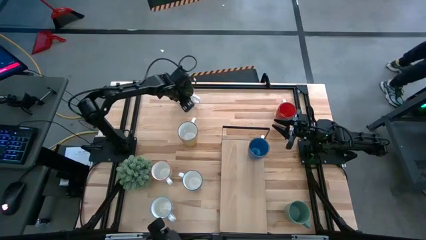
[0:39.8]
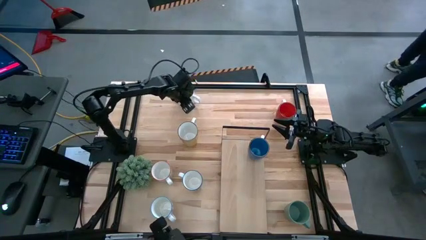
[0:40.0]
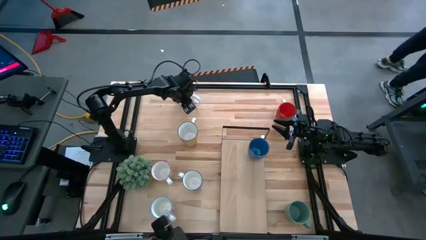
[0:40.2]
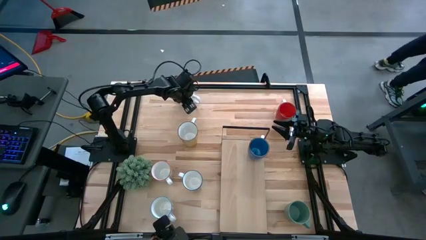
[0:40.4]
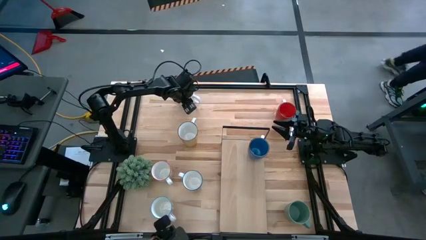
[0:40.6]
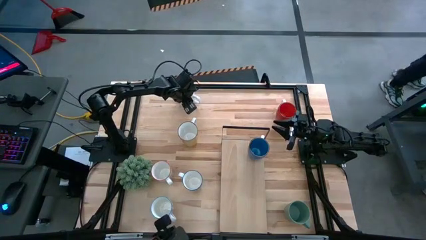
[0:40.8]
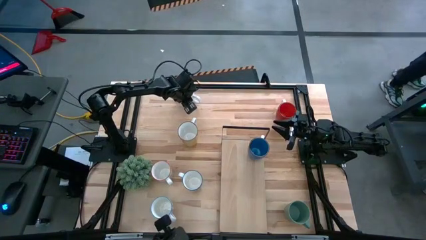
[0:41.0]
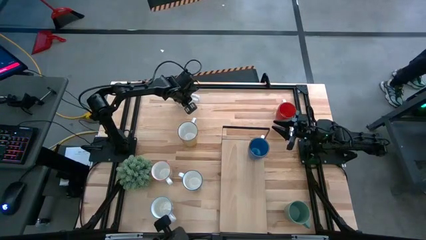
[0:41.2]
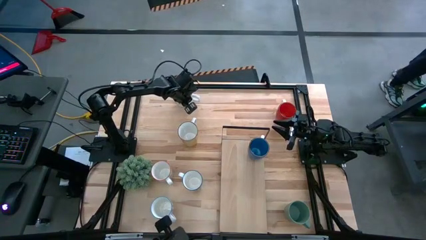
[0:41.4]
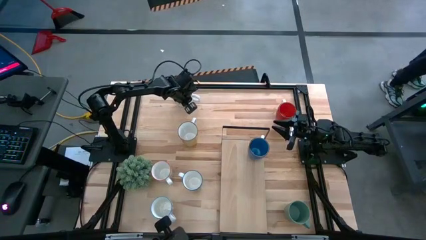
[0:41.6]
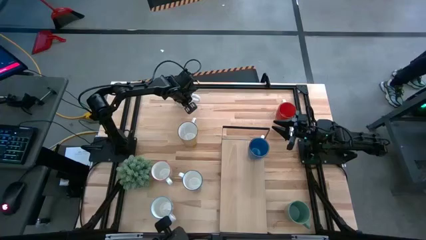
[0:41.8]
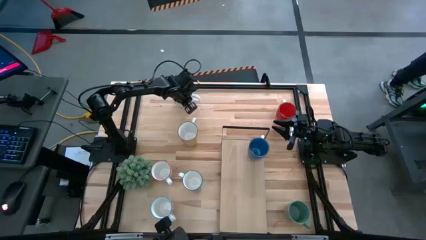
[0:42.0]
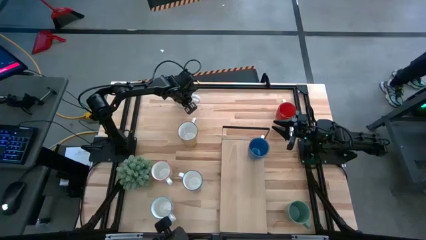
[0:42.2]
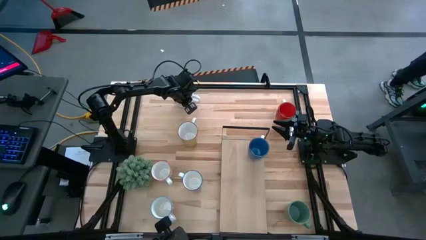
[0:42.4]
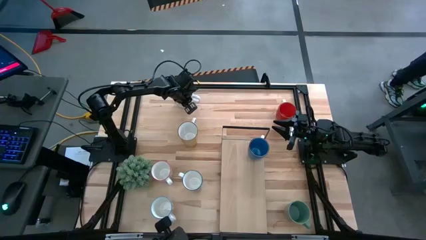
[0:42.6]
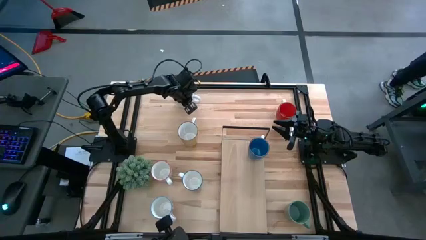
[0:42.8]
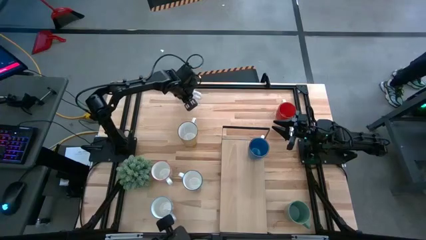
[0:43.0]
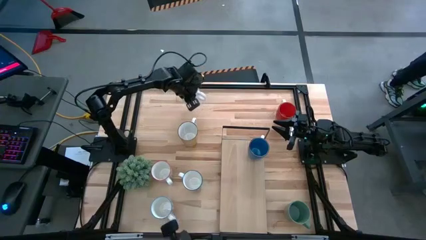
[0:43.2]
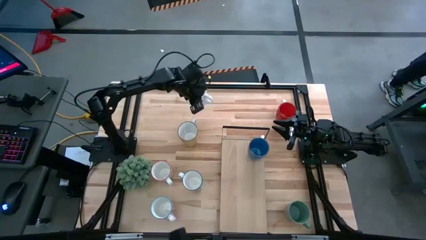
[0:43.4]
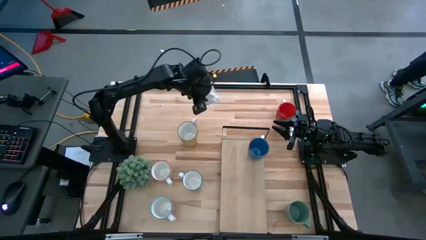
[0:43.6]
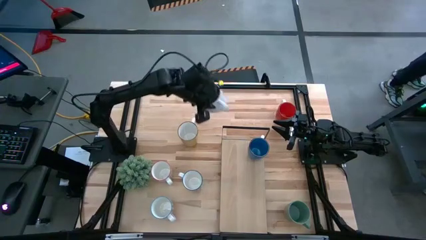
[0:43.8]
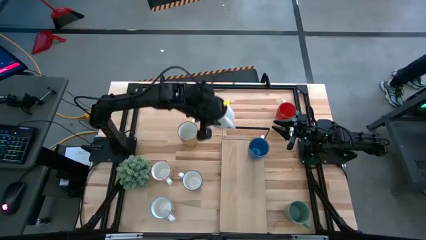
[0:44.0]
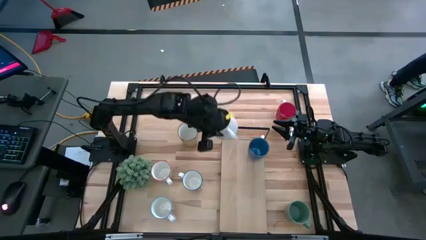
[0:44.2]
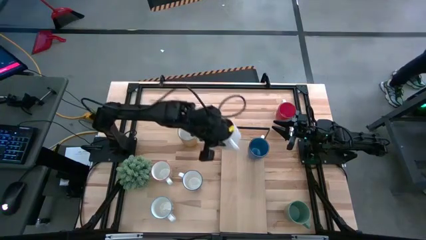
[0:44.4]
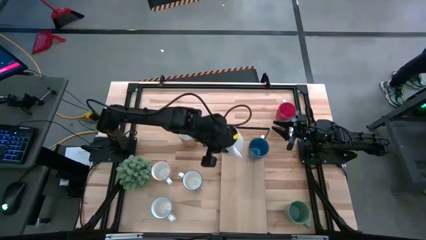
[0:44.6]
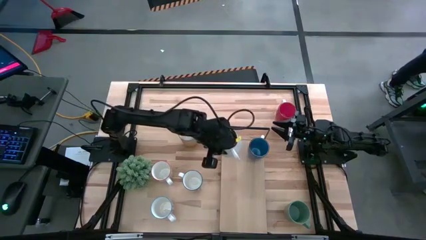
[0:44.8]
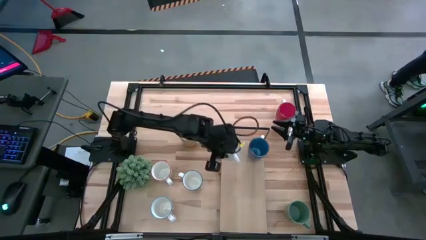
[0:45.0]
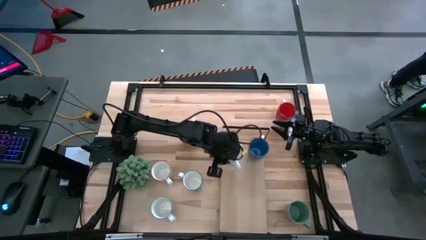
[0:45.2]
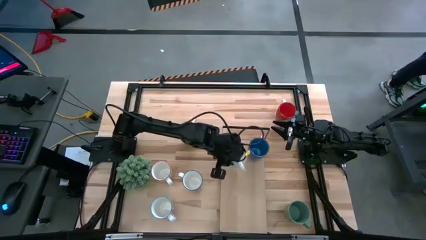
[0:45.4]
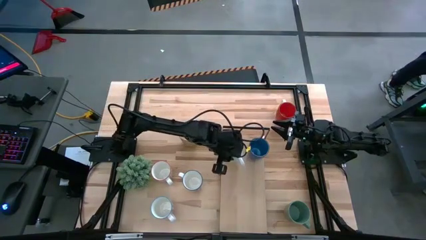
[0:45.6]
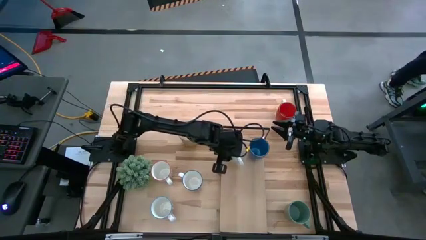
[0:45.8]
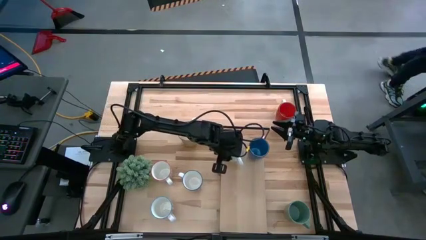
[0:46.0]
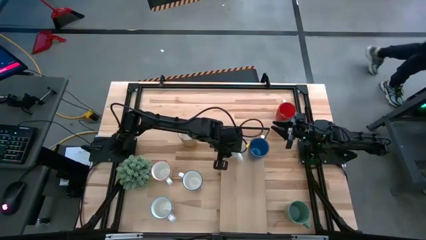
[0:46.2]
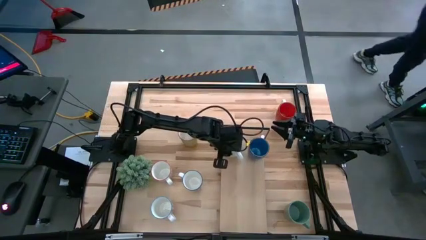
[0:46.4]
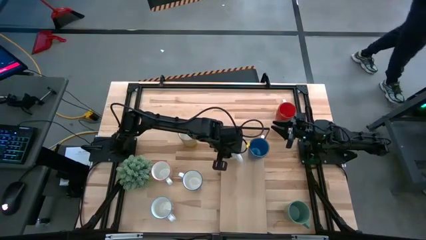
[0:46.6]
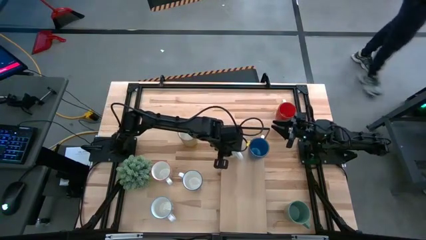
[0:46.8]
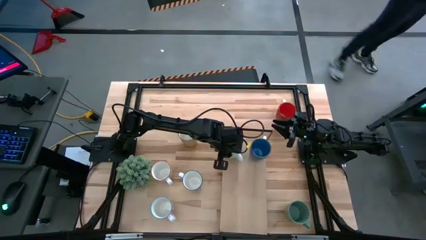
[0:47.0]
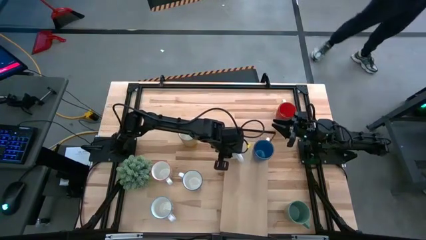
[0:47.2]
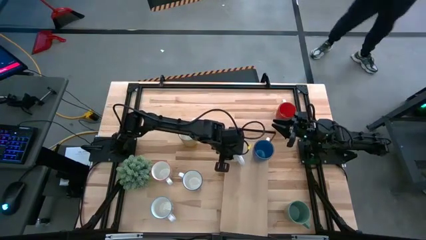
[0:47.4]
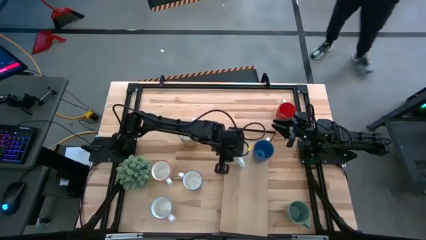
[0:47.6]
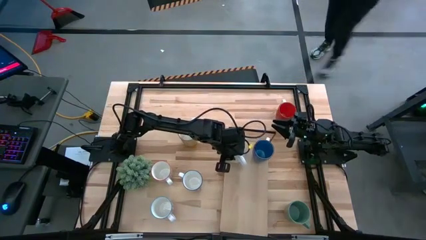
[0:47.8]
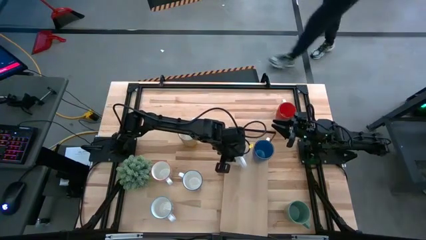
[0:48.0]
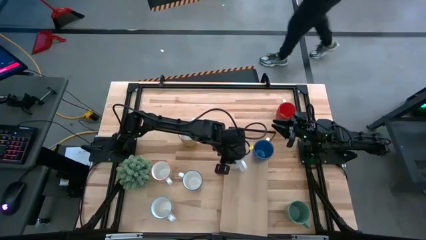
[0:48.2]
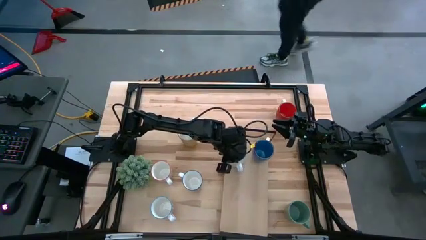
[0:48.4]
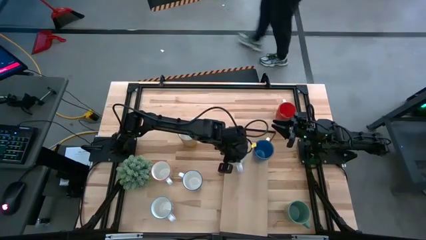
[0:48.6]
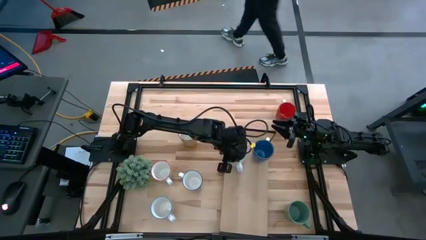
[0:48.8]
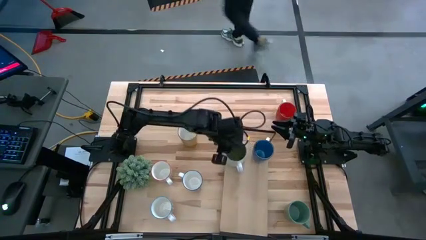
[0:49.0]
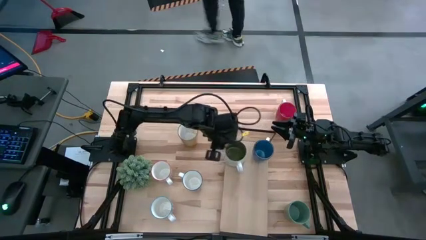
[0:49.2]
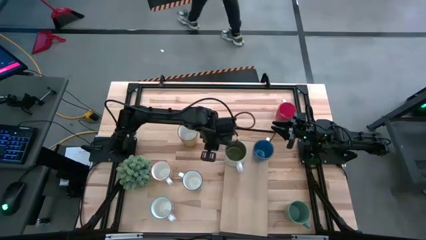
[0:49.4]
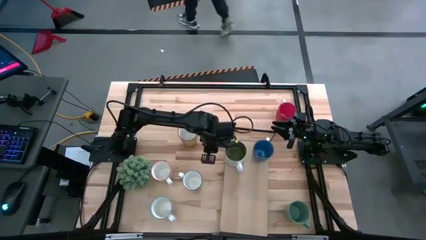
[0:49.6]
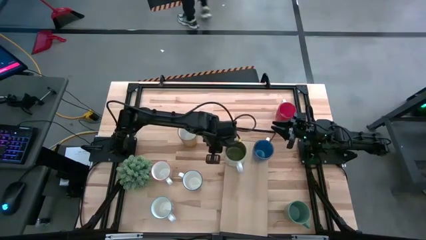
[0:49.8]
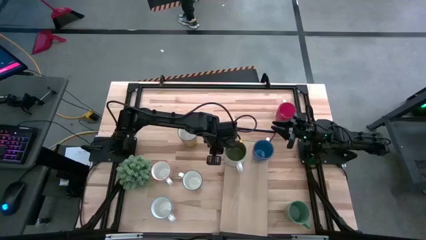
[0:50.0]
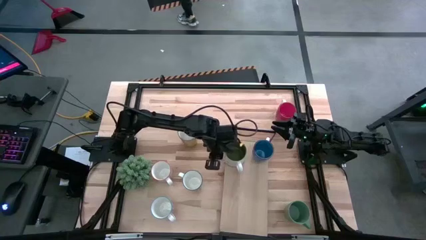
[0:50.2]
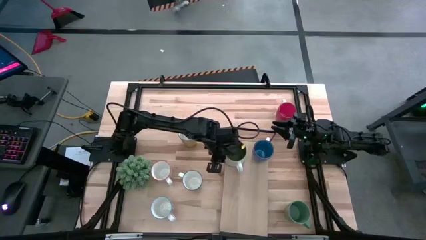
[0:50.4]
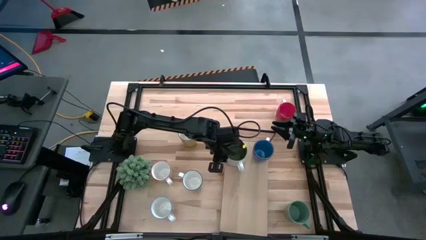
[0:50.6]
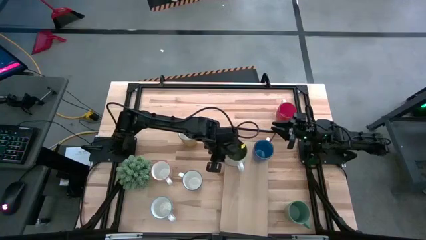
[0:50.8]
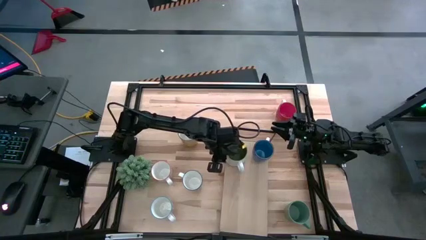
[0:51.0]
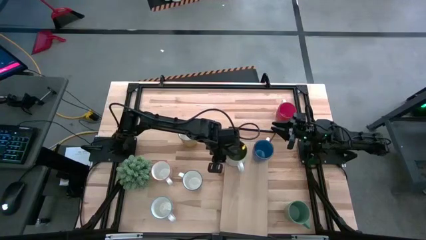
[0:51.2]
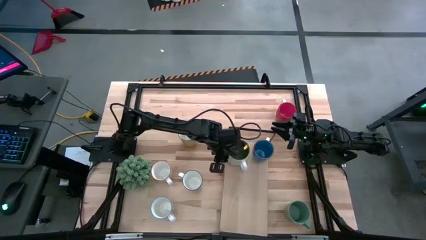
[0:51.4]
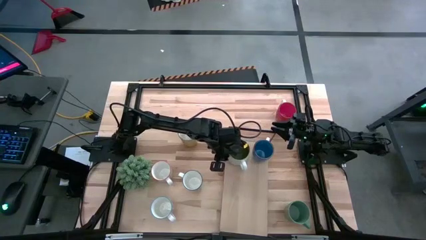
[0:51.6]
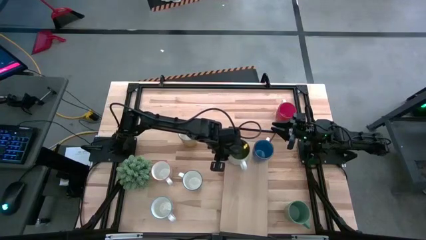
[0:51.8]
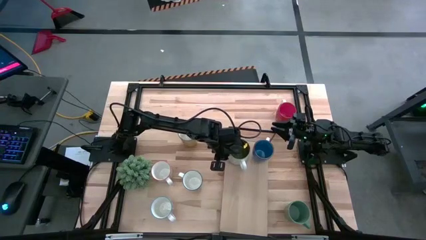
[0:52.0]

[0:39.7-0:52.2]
Task: Place coffee mugs
Put the white mug on the shelf
